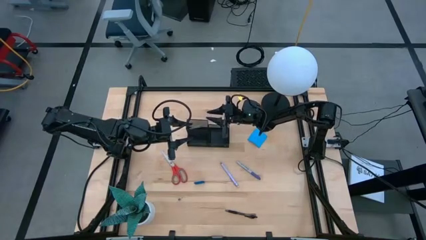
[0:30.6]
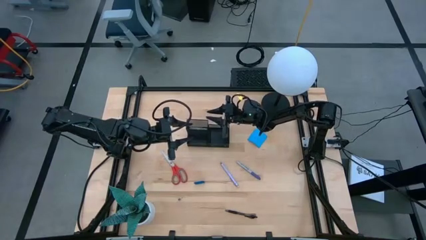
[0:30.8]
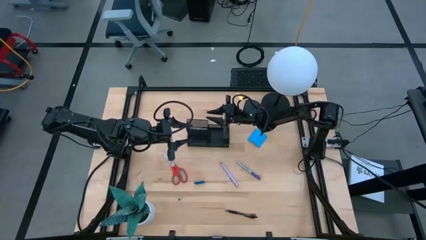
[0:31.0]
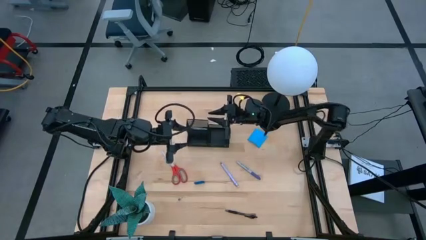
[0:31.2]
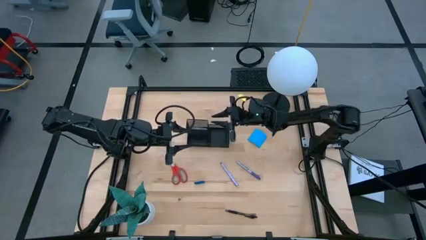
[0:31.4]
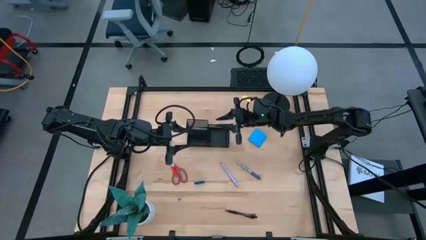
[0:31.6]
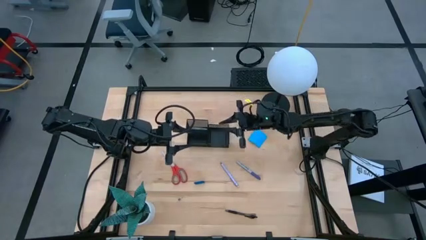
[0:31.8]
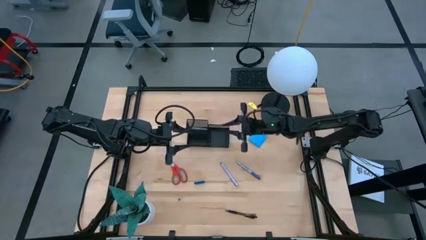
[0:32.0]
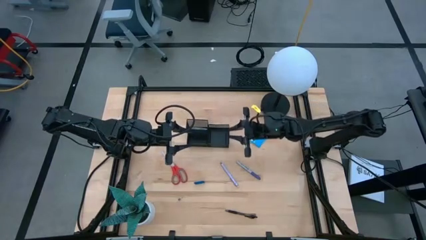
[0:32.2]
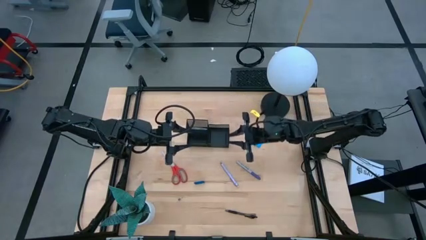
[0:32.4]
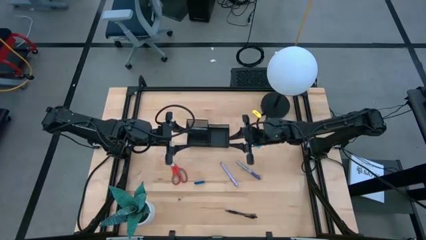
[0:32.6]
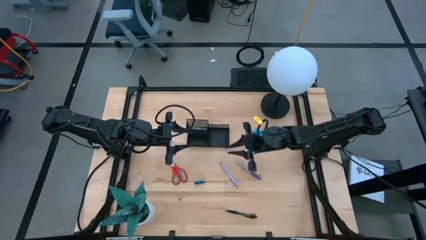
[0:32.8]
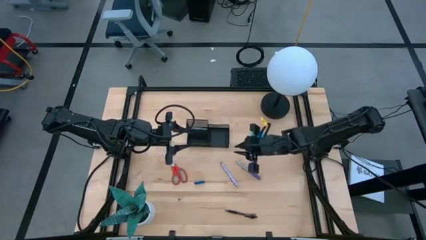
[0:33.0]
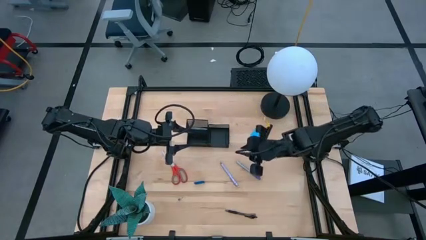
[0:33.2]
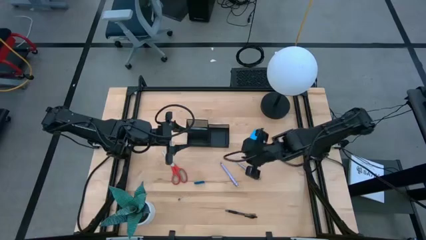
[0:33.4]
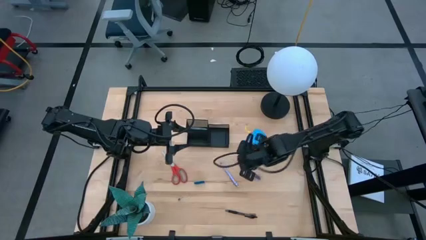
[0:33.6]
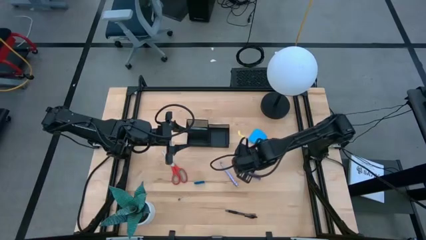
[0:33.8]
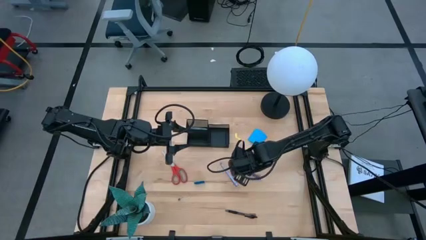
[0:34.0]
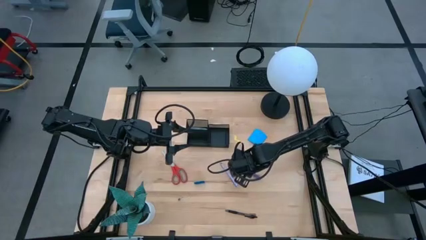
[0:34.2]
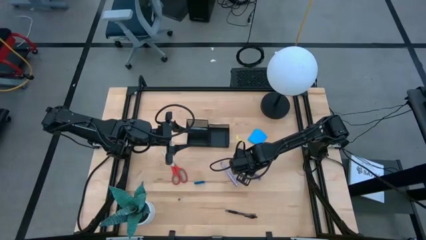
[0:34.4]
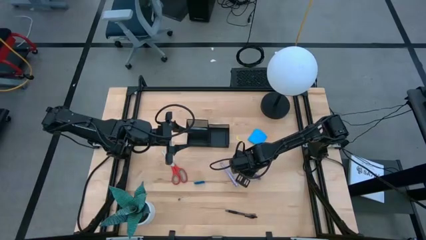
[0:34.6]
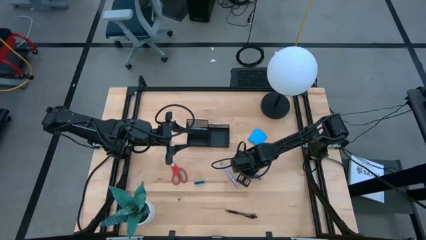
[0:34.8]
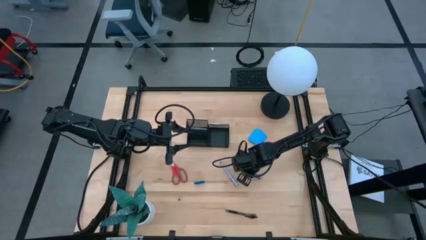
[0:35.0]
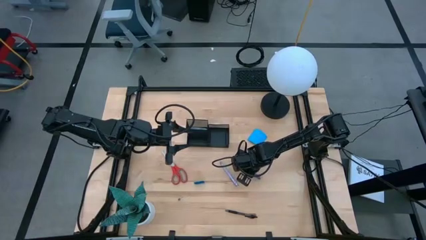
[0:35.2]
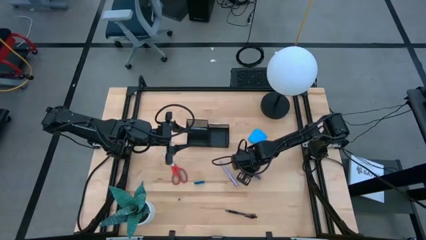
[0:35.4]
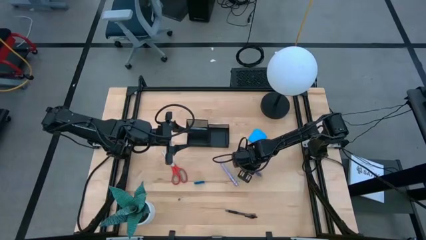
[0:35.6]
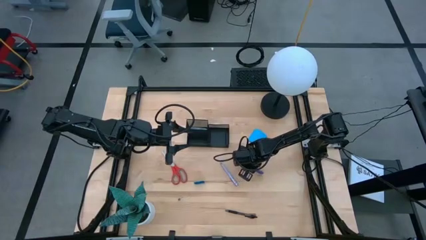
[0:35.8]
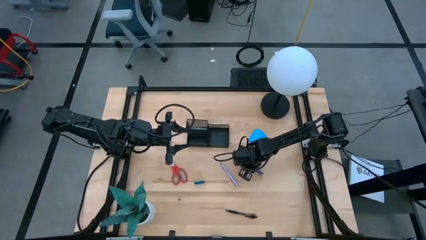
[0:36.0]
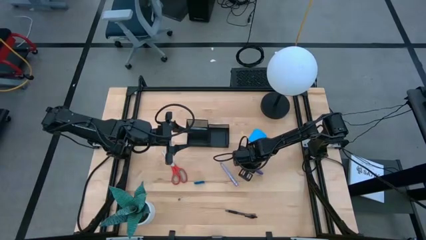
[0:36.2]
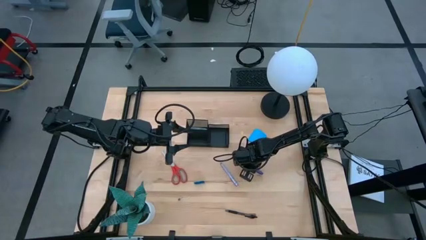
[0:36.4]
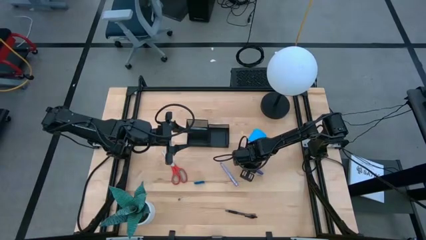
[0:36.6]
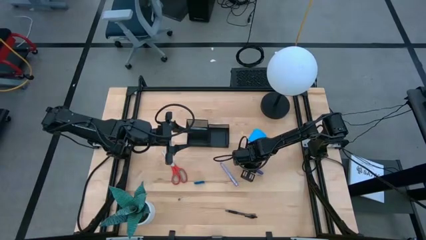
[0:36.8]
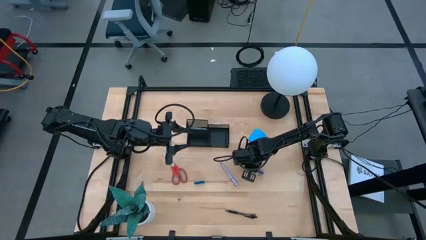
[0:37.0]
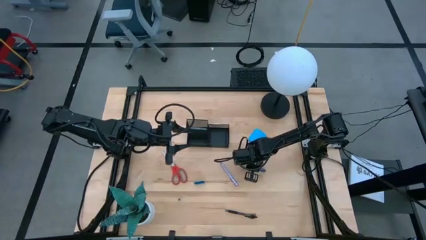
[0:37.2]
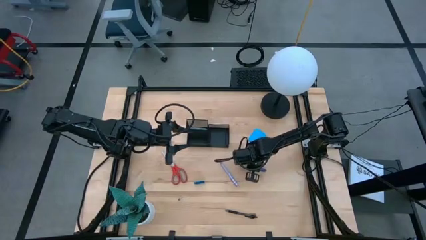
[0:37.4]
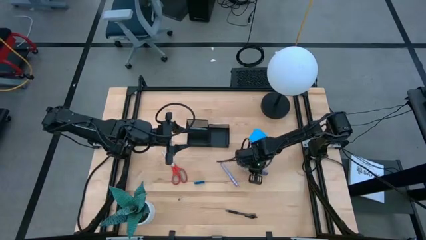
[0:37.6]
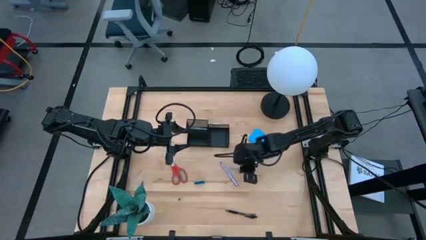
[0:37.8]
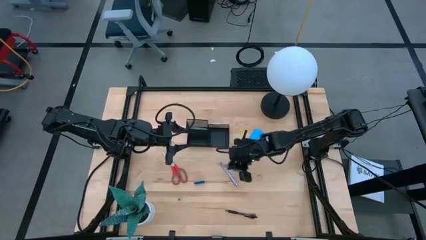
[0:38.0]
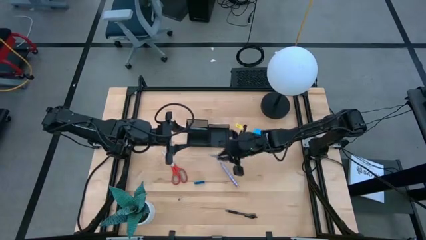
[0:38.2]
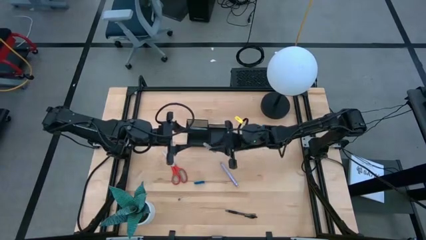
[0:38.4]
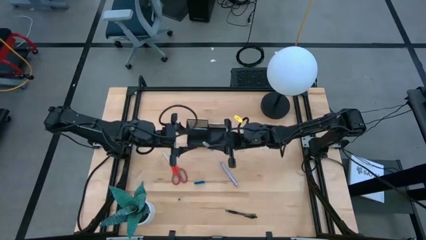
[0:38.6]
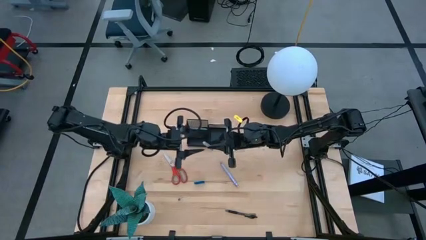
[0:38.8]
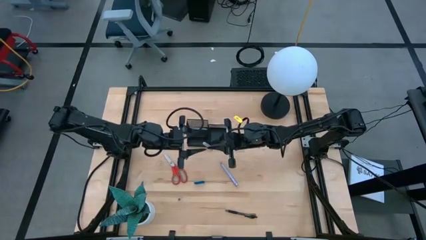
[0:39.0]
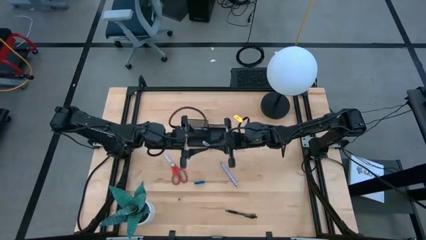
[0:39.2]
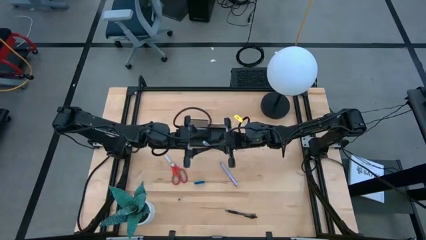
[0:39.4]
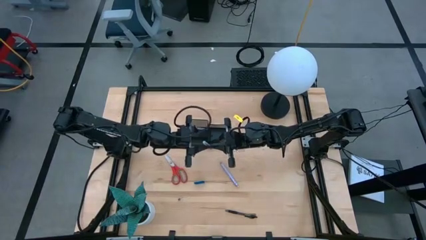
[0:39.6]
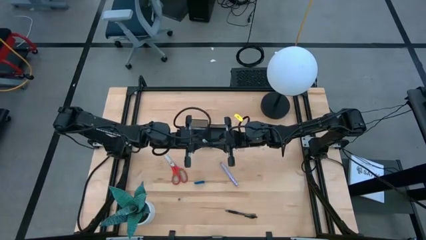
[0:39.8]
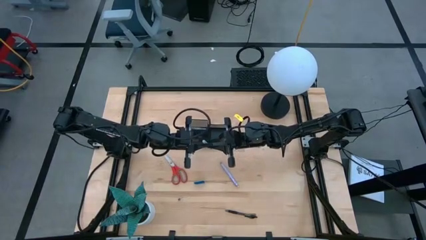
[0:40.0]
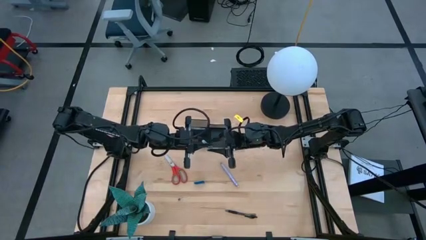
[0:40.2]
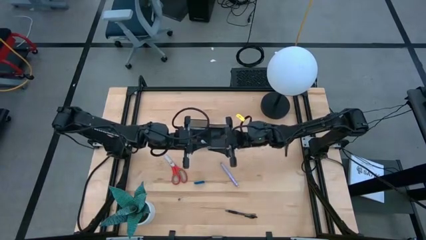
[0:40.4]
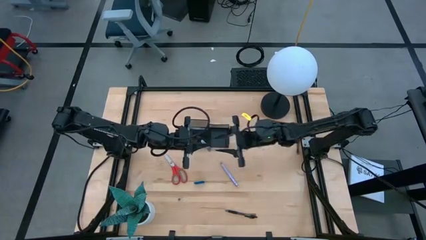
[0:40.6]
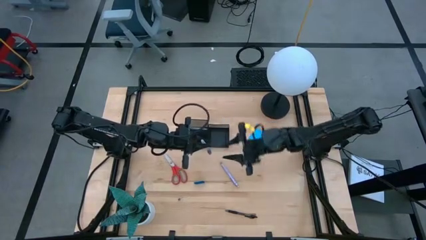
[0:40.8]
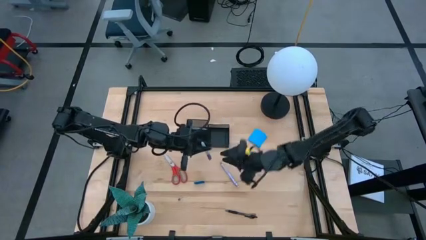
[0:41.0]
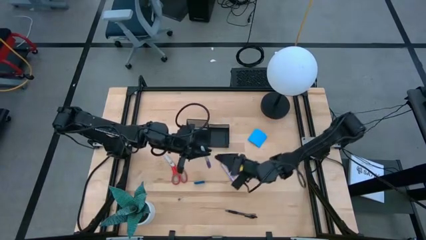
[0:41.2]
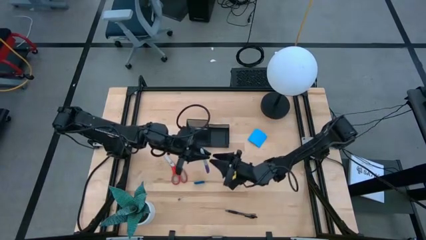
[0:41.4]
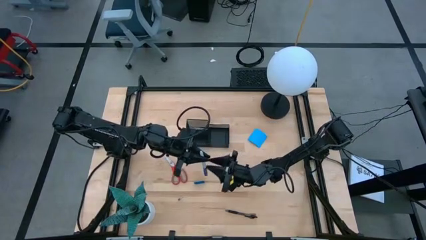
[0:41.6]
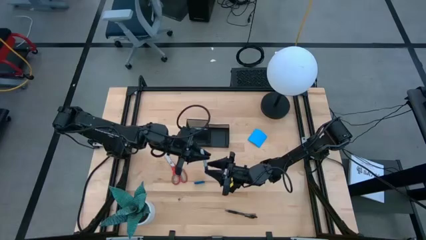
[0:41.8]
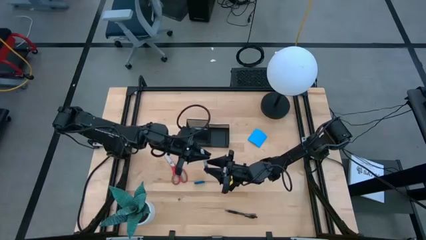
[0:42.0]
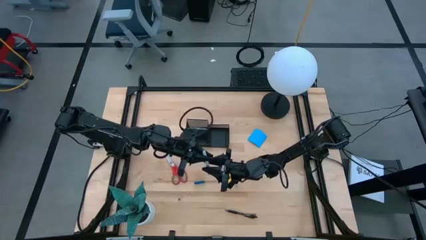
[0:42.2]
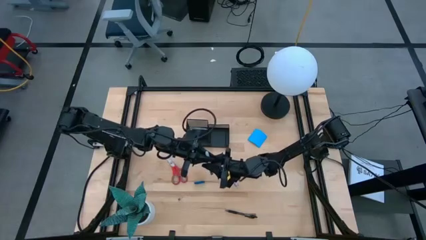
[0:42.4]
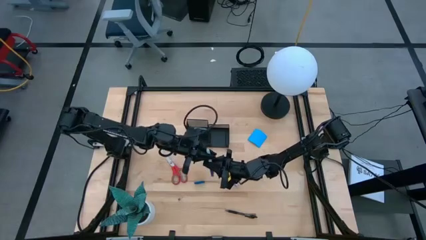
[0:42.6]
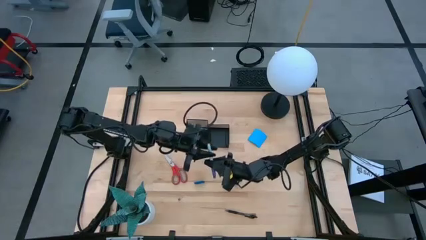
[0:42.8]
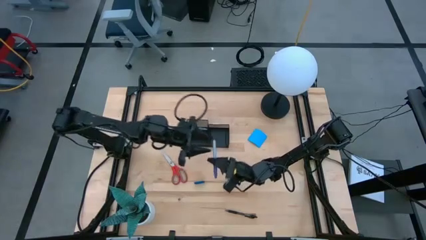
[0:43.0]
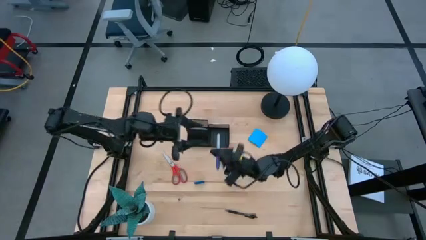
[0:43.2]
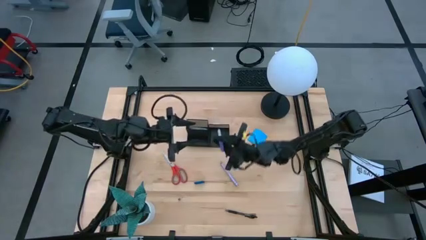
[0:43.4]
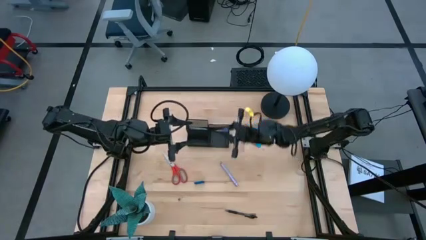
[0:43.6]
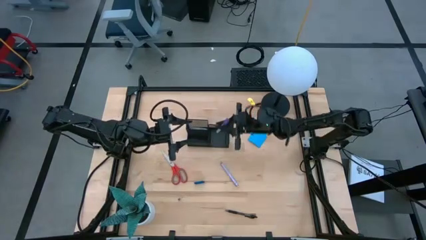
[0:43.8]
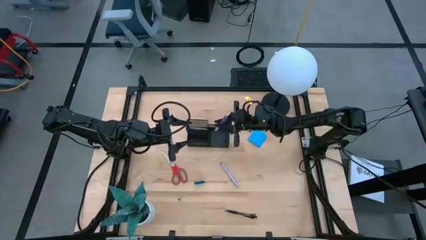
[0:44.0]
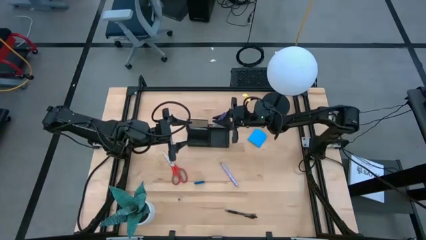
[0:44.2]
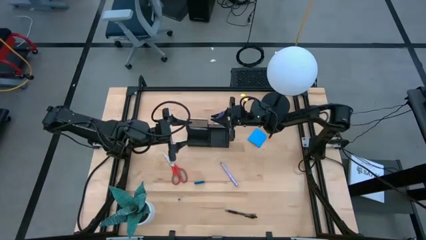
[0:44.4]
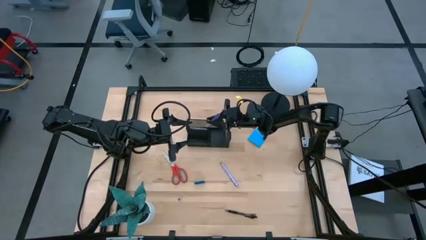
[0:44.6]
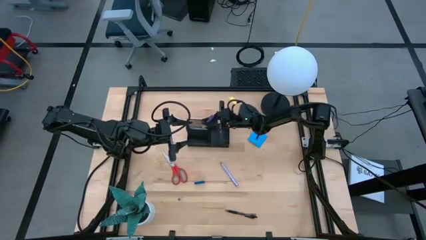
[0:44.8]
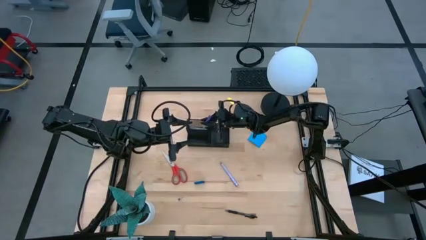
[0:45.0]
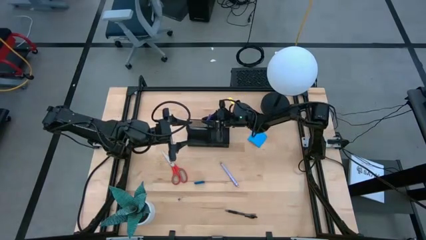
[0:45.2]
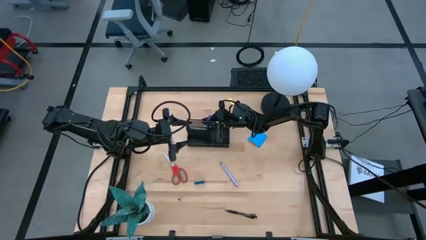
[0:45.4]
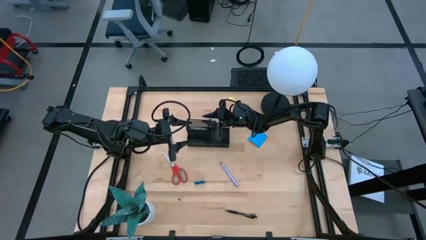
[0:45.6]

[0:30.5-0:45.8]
Task: Pick and place office supplies into organizer
Put the blue marker pen into the desk organizer

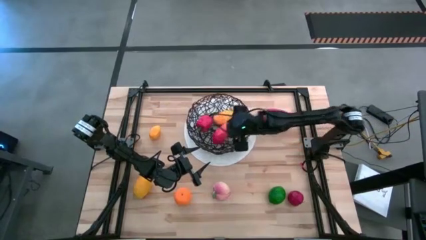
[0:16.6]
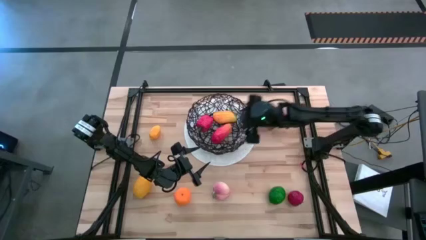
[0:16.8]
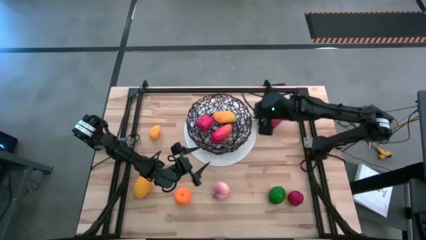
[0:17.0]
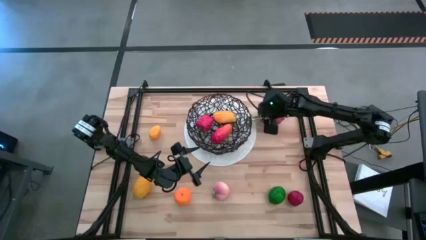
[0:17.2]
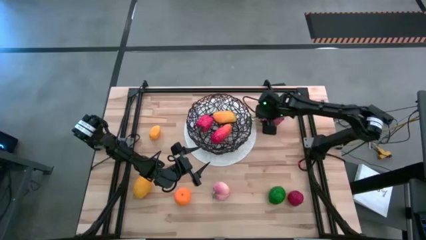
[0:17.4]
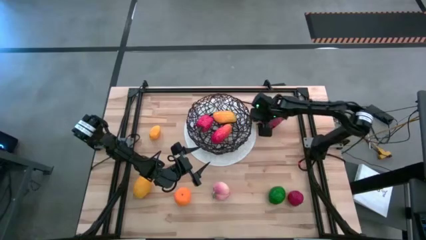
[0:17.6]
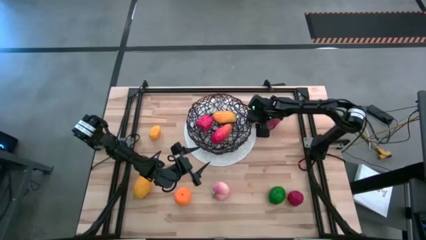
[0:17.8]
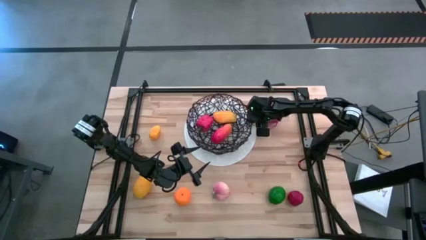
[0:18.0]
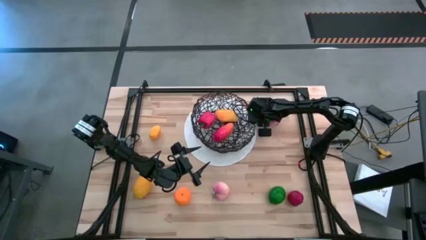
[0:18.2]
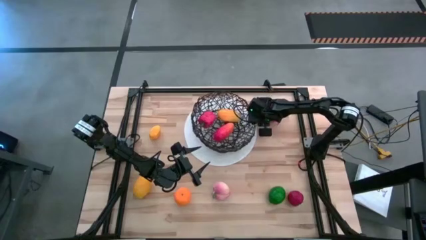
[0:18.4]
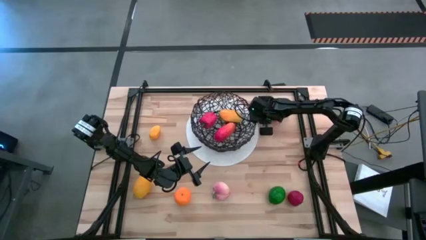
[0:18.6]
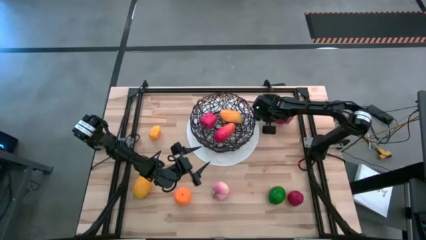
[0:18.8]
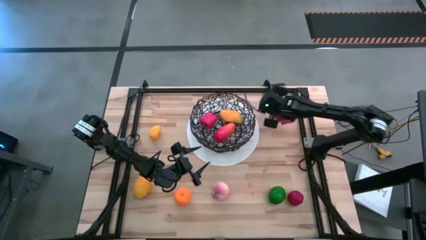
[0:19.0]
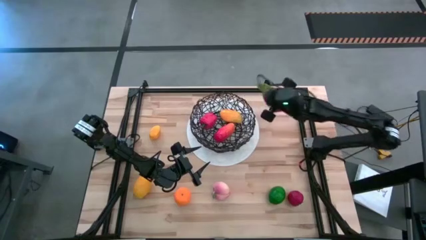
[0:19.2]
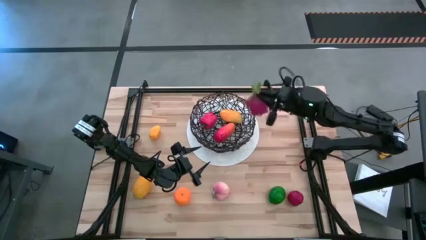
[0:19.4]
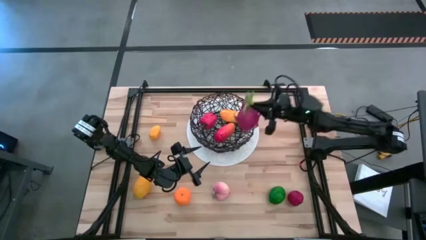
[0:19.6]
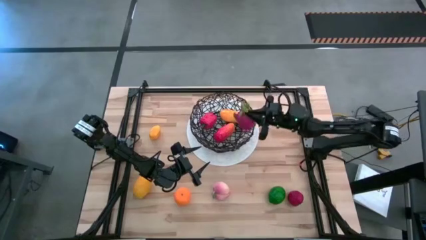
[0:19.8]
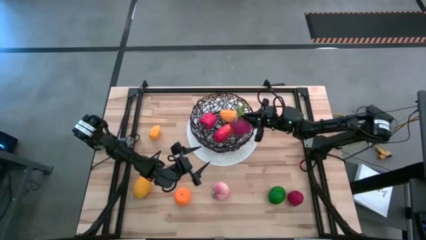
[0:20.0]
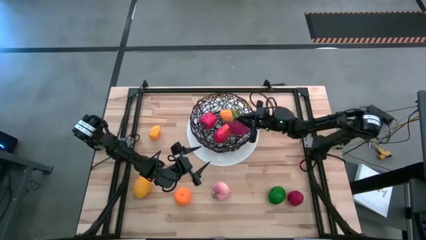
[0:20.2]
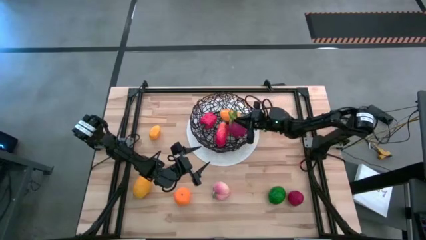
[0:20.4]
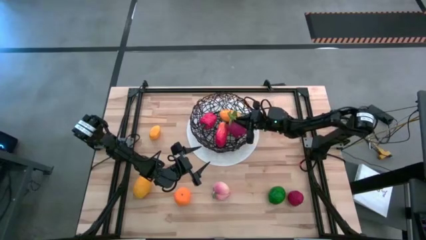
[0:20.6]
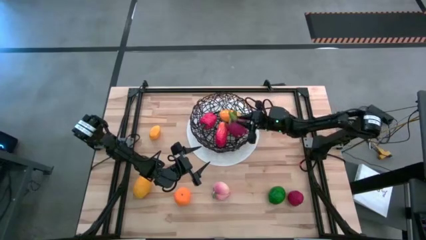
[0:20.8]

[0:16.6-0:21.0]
Task: Build produce basket
Put the dragon fruit into the wire basket
